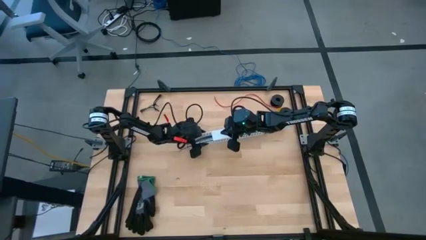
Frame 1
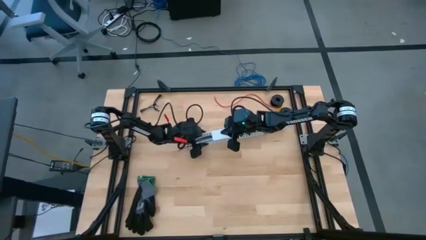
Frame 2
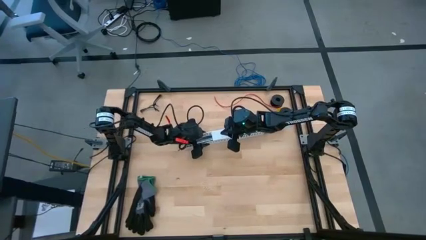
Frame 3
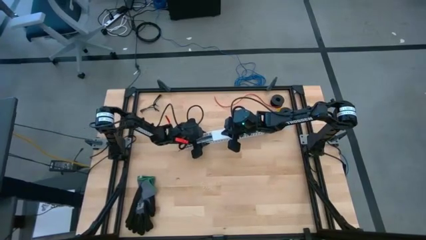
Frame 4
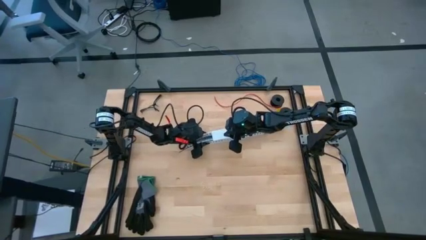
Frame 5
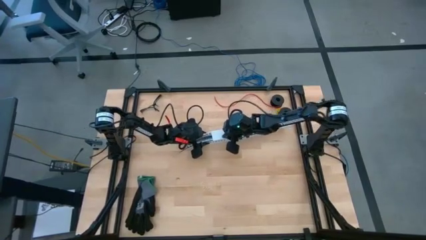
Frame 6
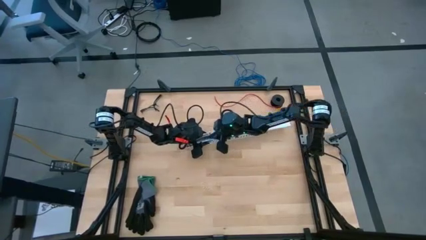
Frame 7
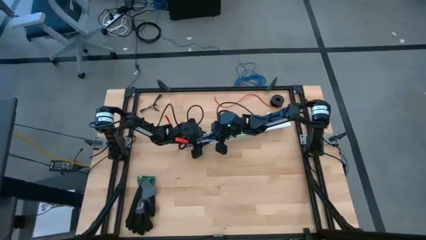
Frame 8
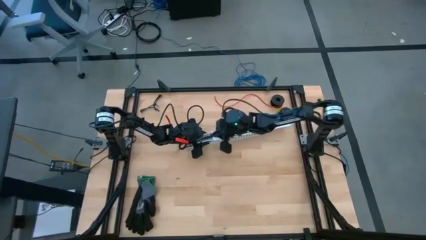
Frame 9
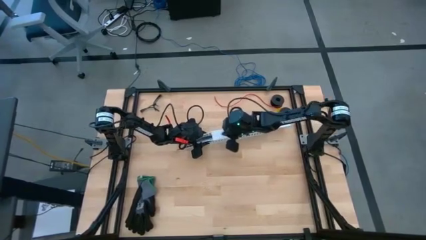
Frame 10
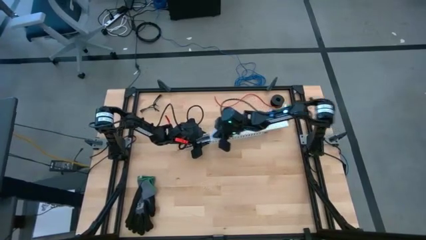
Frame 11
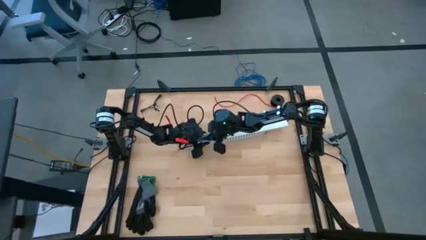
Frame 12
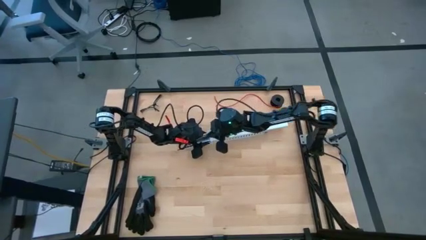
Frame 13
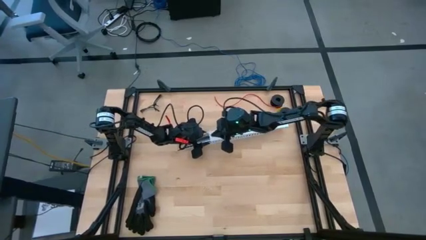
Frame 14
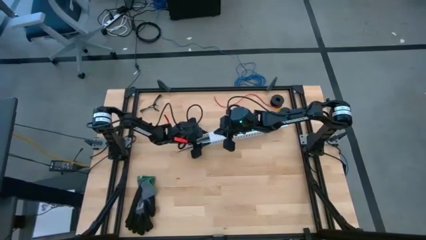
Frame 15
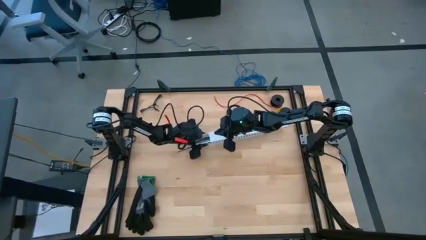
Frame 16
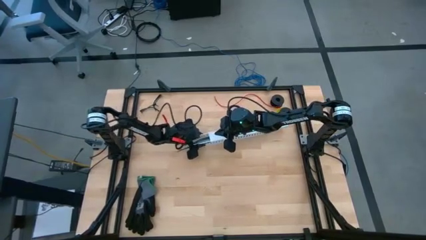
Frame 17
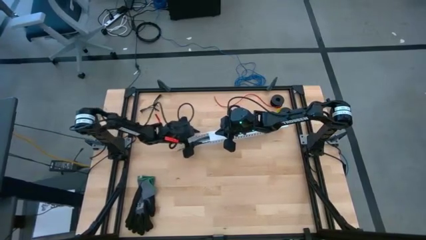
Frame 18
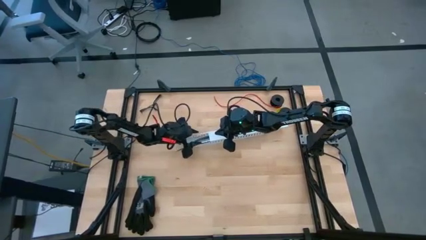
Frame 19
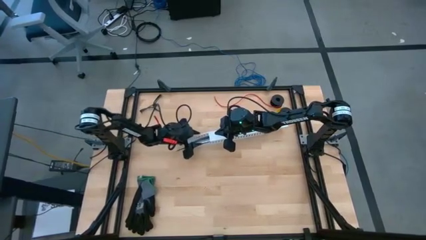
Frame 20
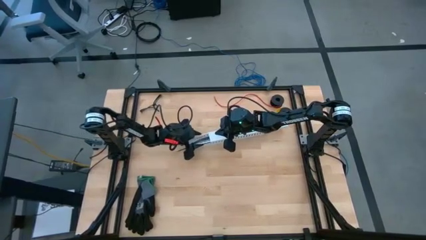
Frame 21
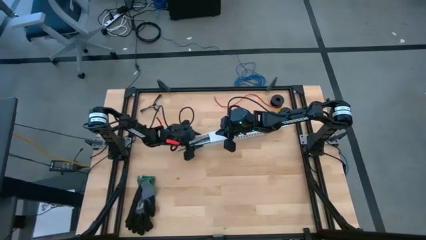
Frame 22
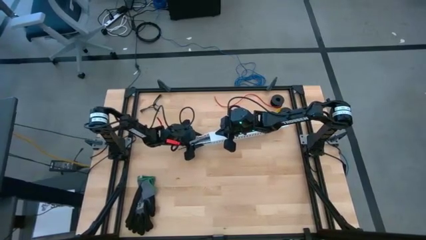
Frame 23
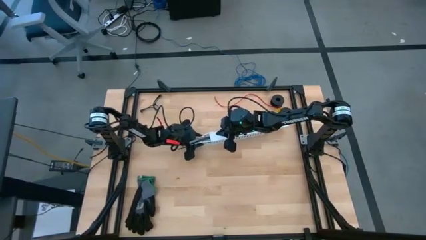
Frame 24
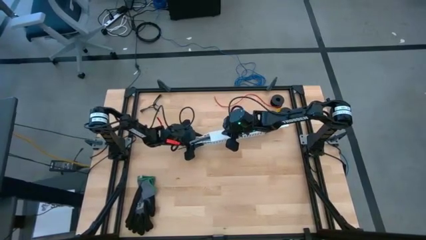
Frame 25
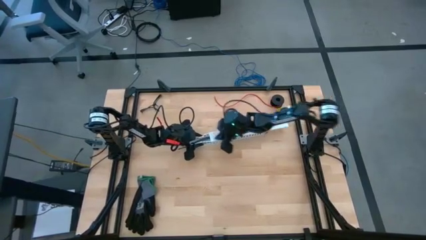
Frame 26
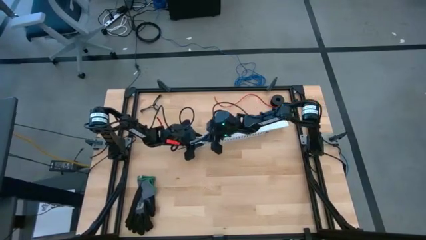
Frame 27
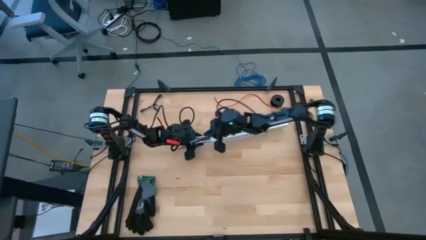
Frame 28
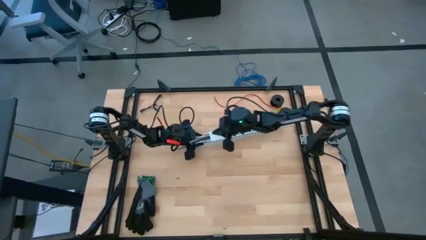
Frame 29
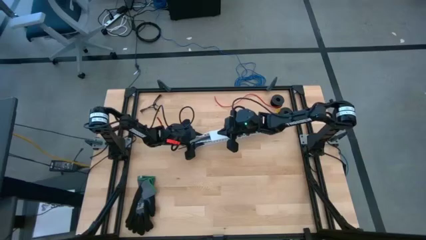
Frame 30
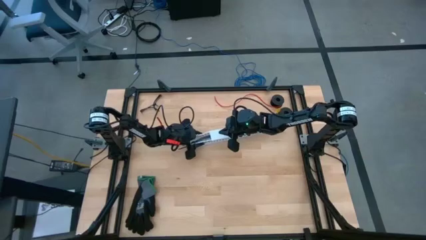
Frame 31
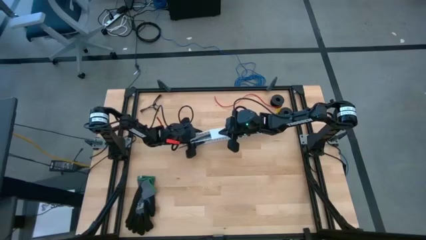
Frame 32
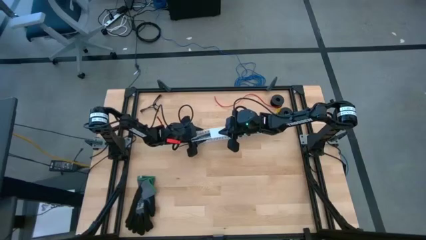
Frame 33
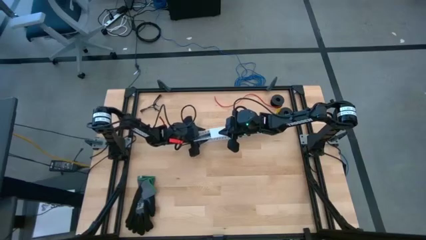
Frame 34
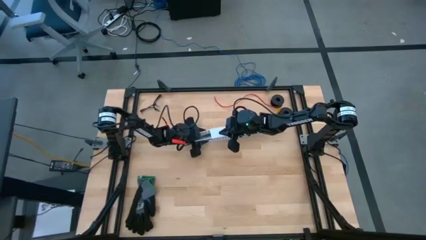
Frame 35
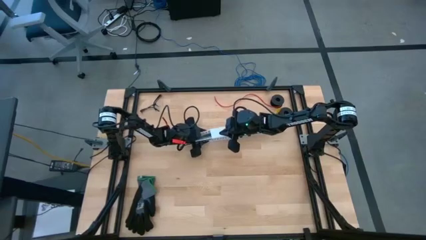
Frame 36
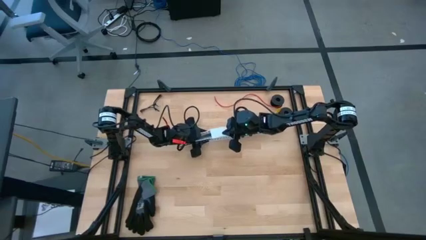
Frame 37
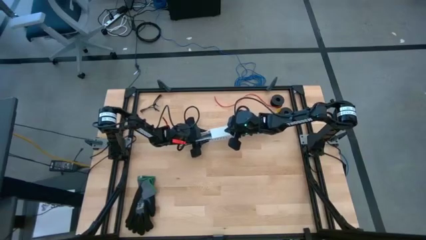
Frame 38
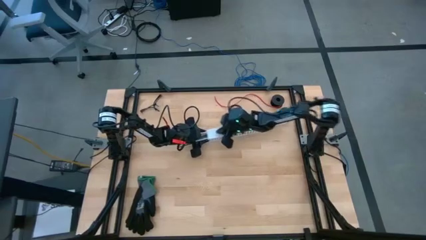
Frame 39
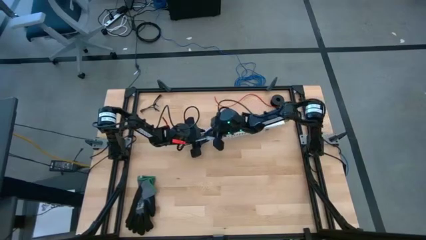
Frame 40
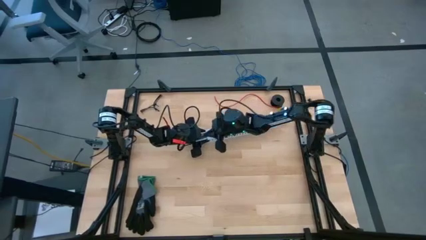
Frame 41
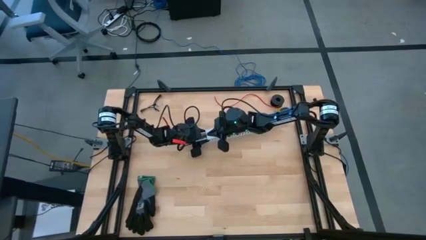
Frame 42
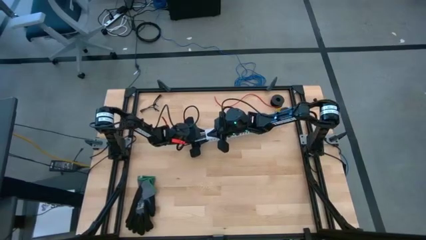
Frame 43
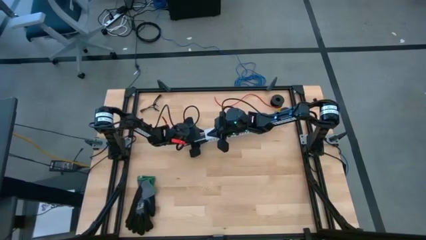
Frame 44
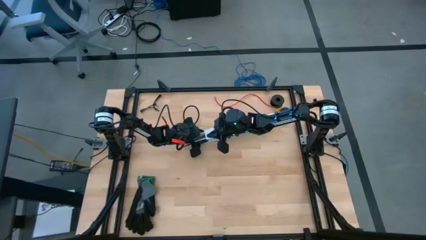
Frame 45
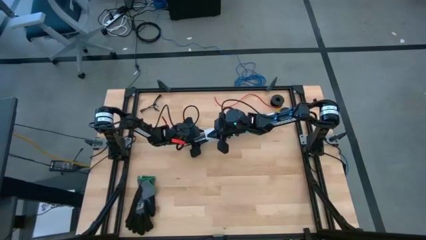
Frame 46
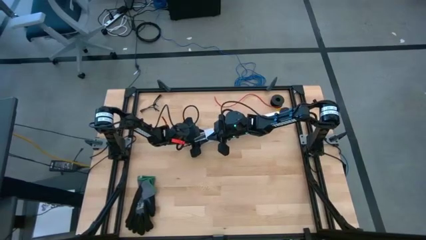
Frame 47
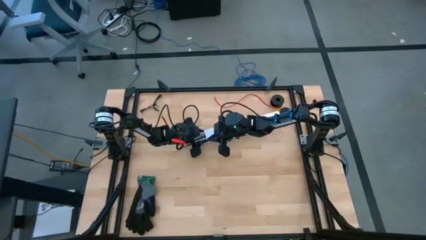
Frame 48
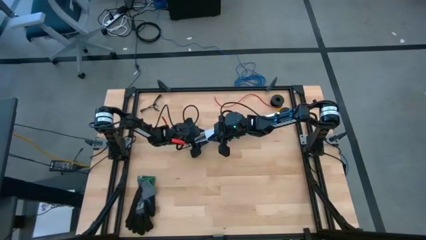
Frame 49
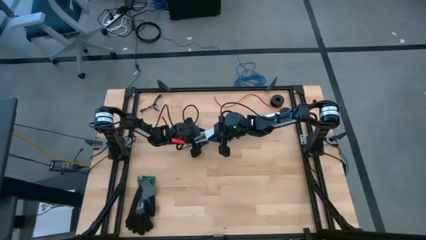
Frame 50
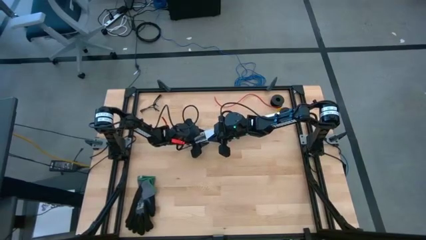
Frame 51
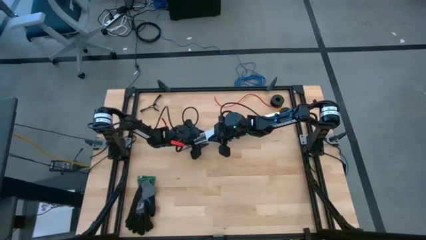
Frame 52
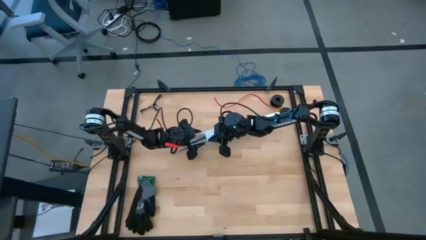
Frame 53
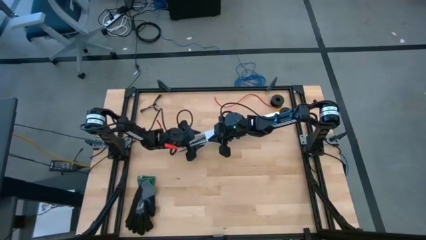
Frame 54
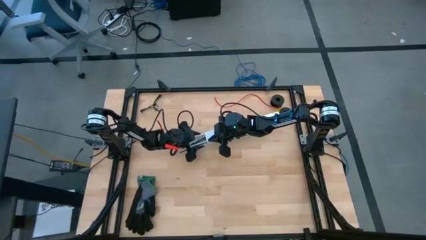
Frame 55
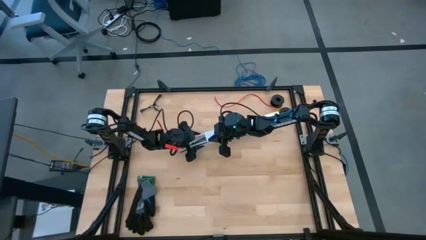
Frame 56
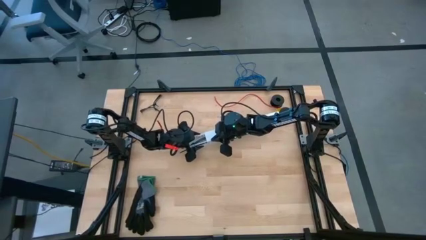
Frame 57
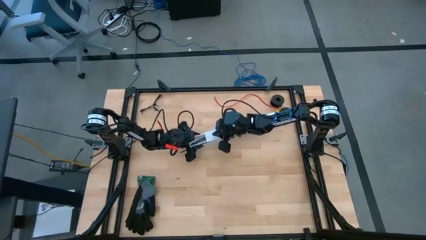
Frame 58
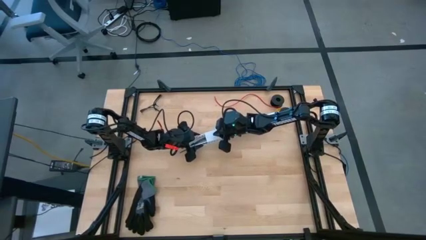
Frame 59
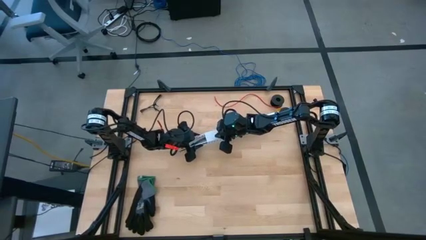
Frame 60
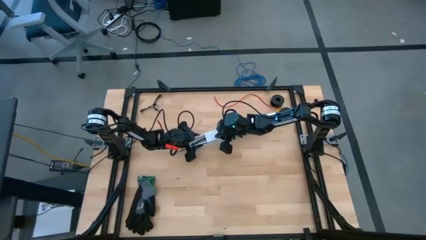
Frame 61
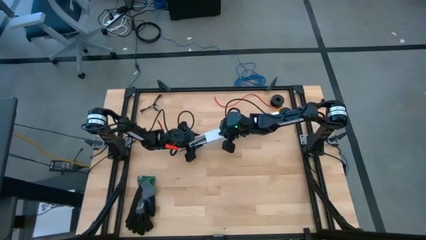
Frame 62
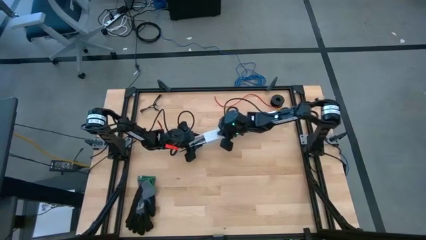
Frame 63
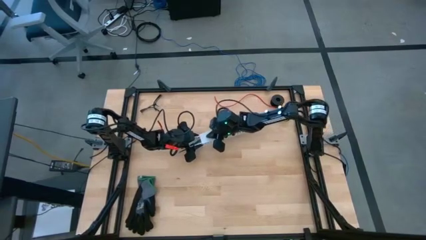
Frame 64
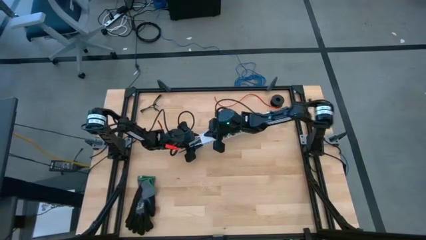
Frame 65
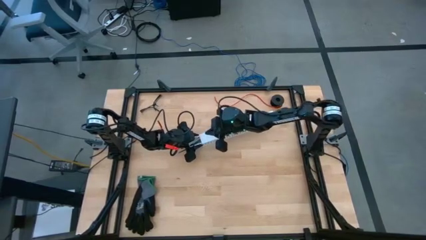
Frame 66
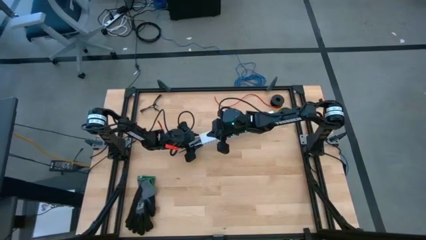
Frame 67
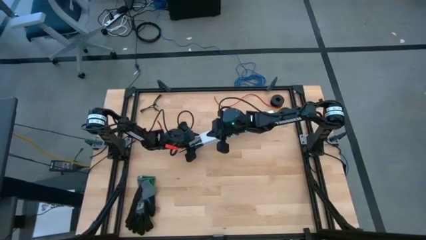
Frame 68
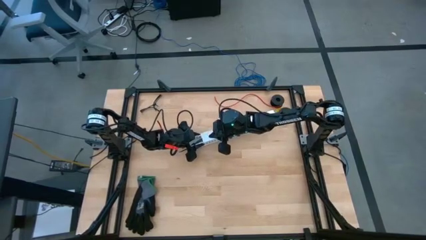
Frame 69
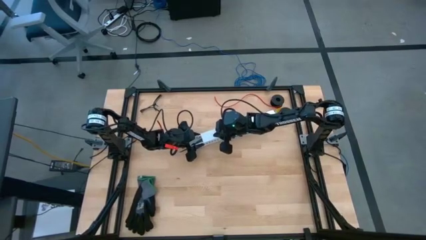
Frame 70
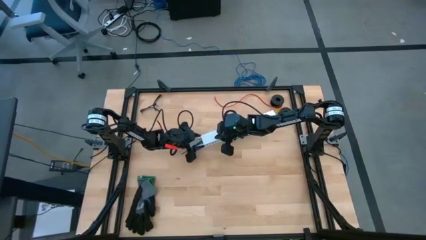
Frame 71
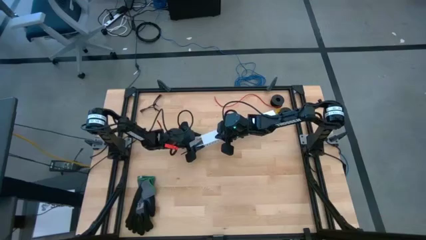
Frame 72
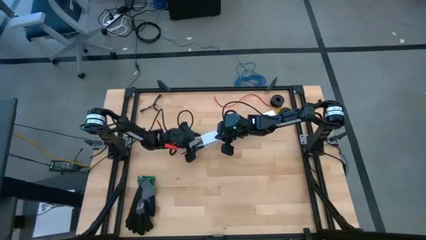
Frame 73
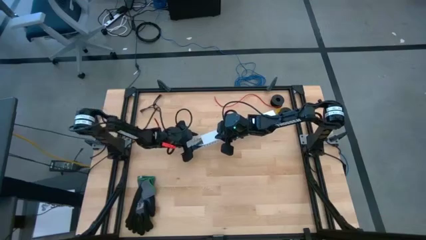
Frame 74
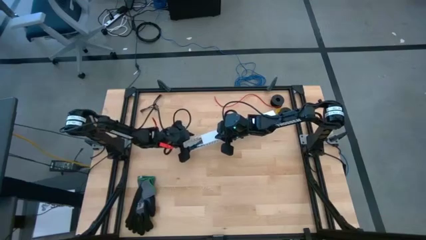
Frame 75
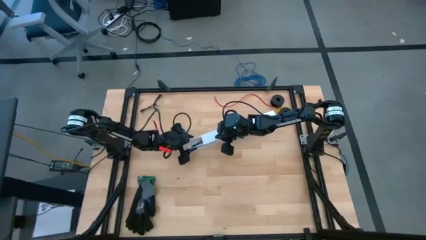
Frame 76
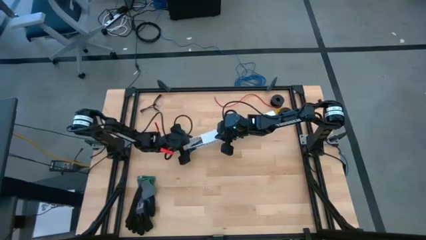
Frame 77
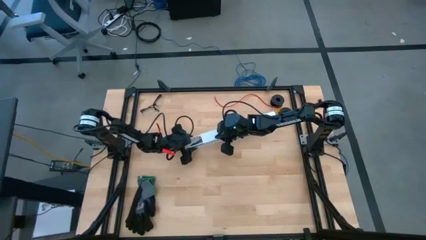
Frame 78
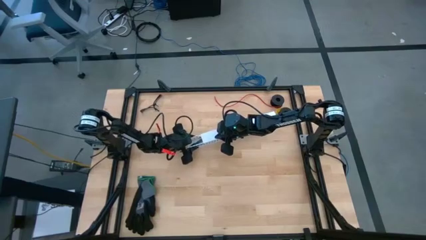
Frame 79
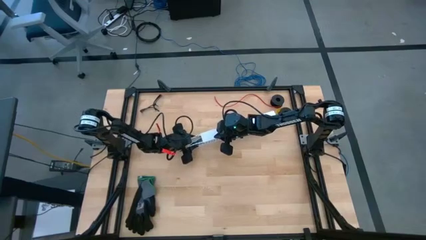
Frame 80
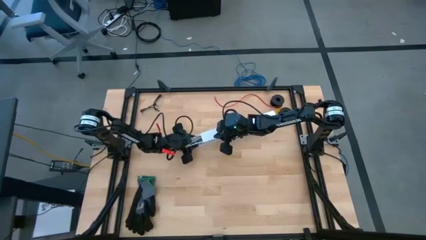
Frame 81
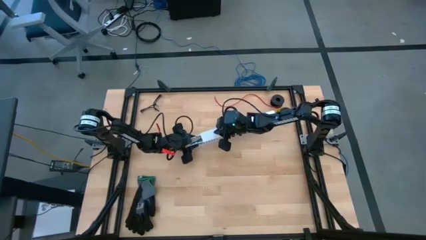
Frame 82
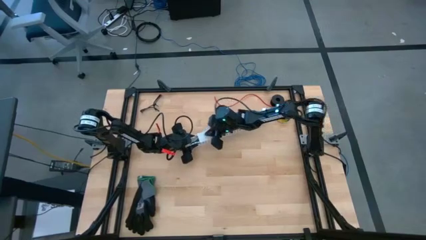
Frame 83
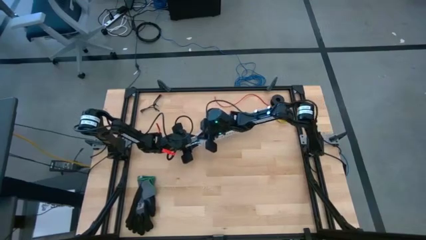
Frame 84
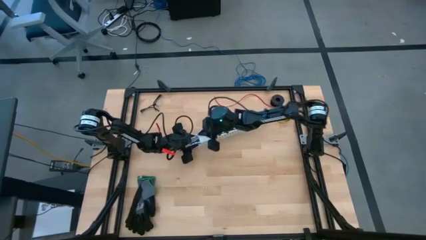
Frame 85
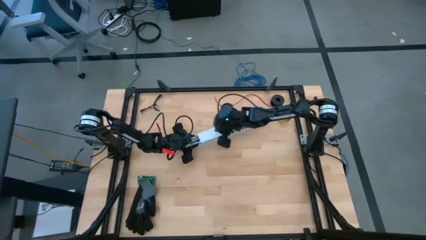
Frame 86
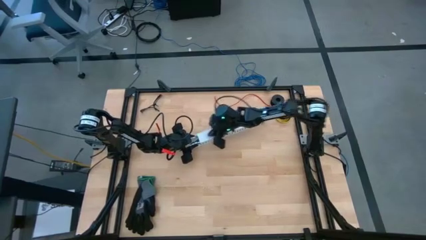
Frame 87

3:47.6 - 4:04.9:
Task: Ziptie cables
Close the cable duct
